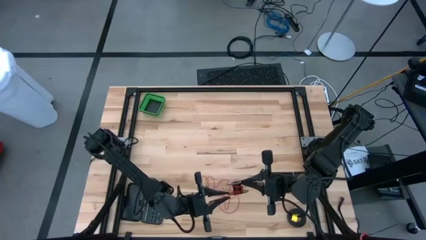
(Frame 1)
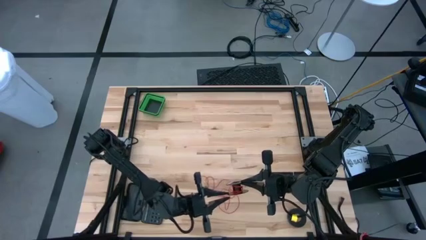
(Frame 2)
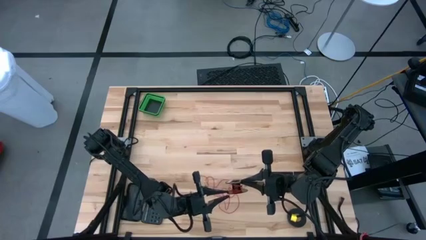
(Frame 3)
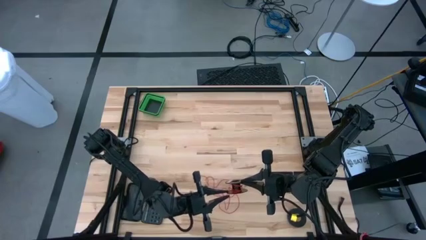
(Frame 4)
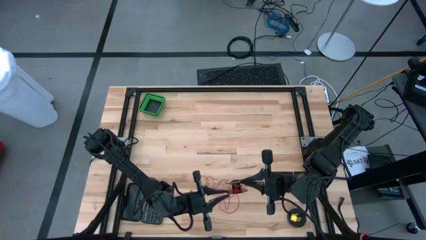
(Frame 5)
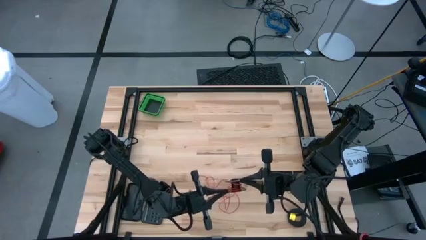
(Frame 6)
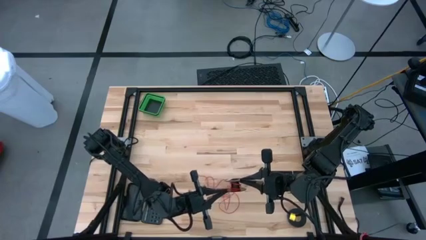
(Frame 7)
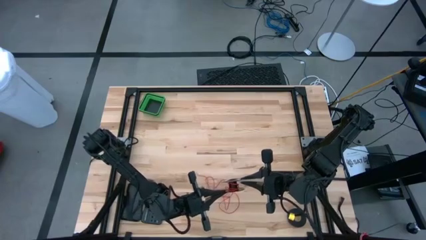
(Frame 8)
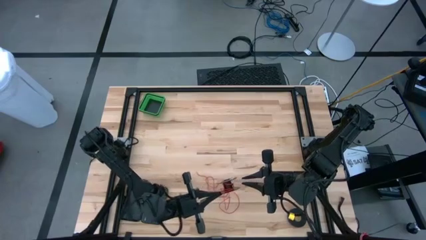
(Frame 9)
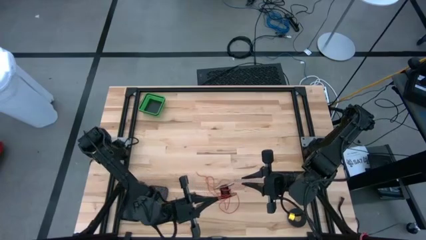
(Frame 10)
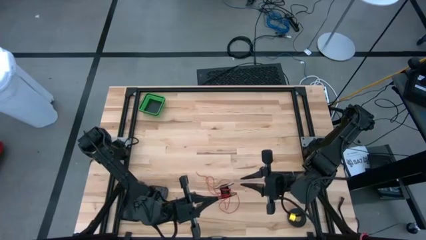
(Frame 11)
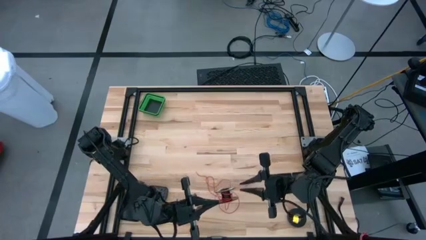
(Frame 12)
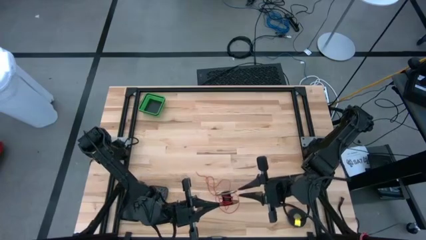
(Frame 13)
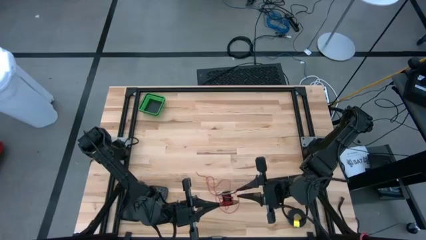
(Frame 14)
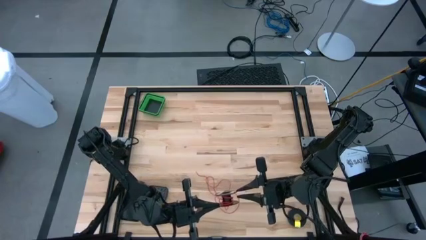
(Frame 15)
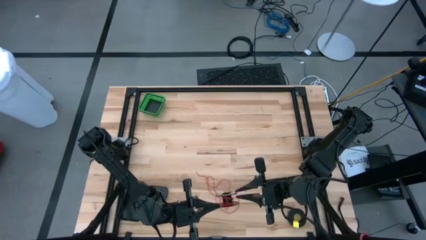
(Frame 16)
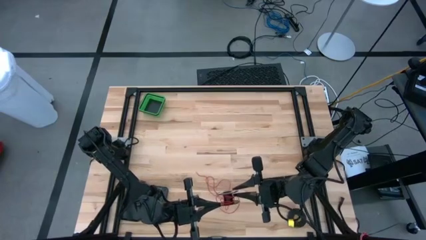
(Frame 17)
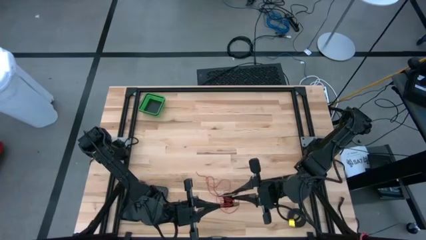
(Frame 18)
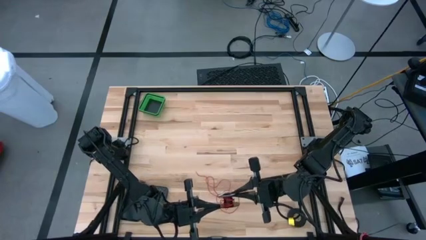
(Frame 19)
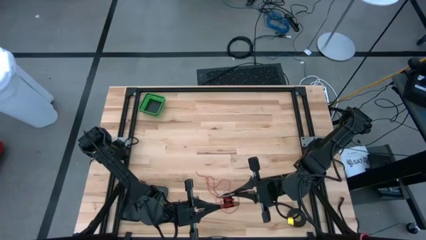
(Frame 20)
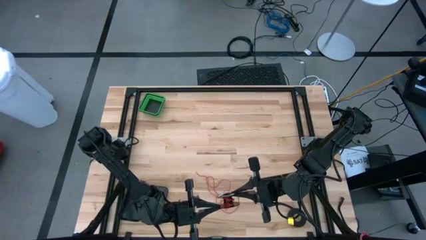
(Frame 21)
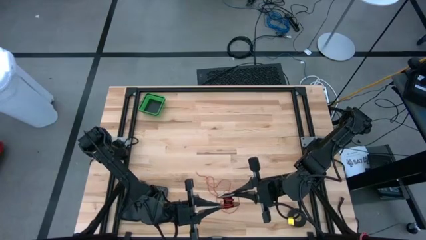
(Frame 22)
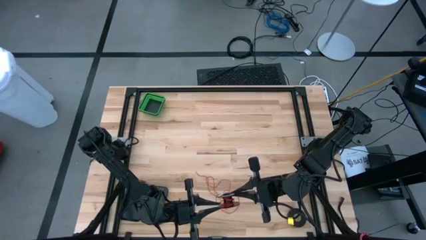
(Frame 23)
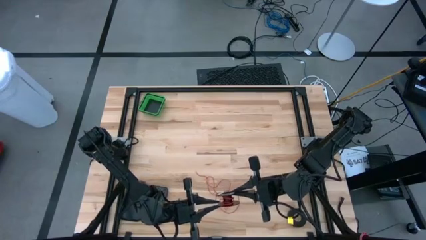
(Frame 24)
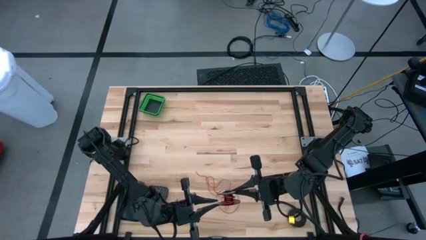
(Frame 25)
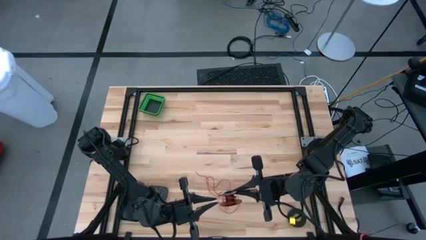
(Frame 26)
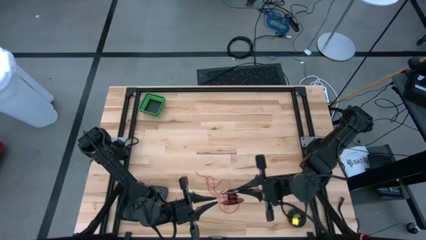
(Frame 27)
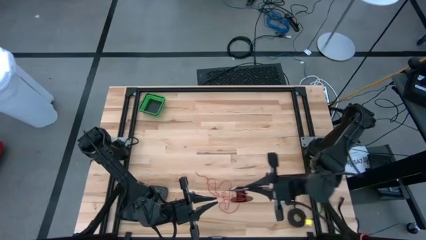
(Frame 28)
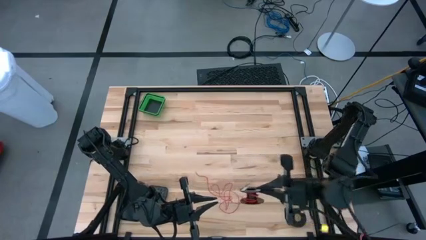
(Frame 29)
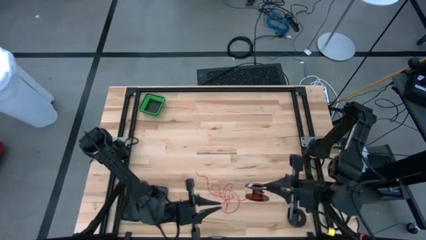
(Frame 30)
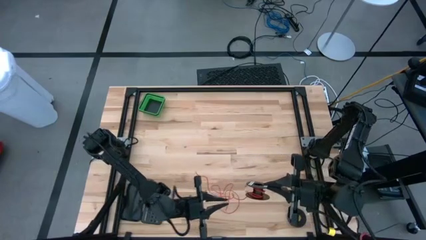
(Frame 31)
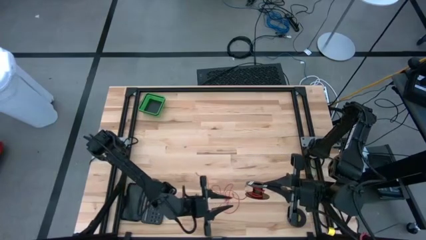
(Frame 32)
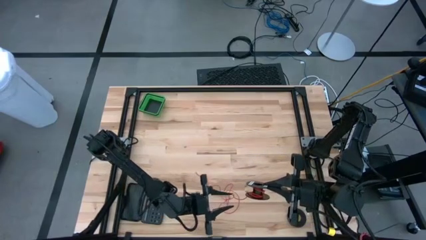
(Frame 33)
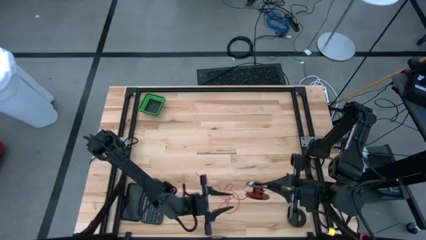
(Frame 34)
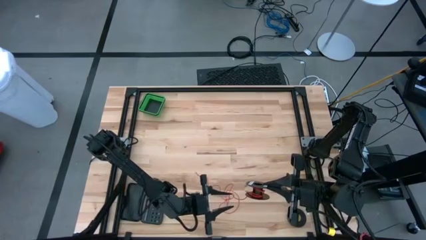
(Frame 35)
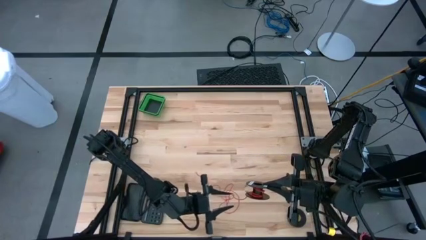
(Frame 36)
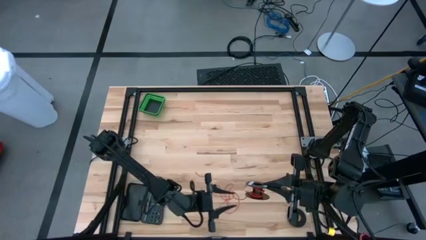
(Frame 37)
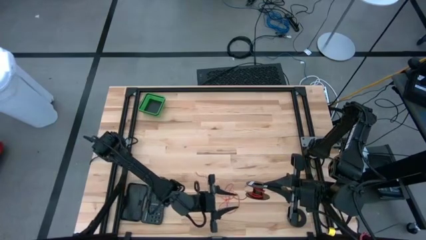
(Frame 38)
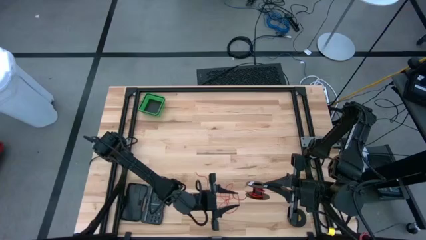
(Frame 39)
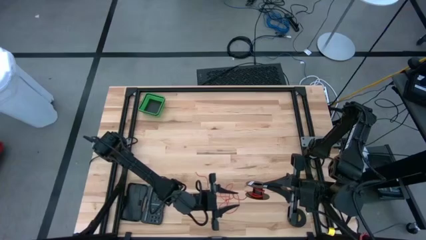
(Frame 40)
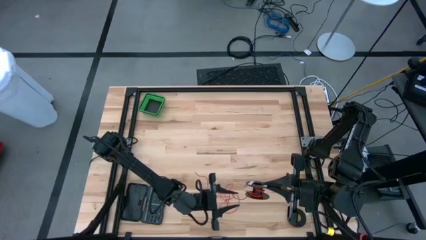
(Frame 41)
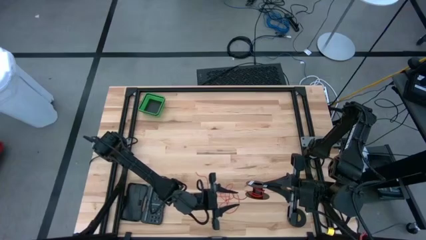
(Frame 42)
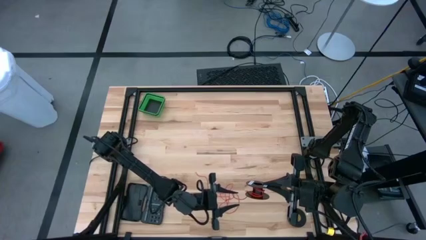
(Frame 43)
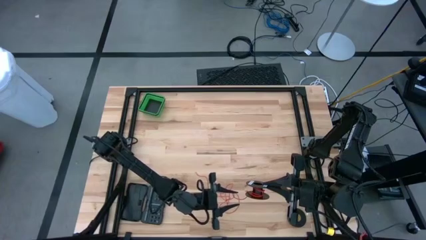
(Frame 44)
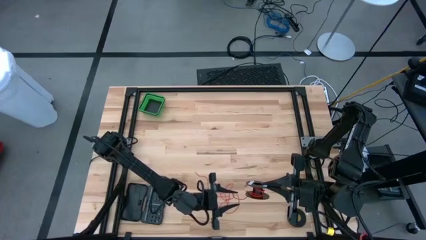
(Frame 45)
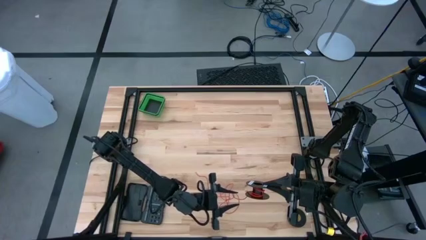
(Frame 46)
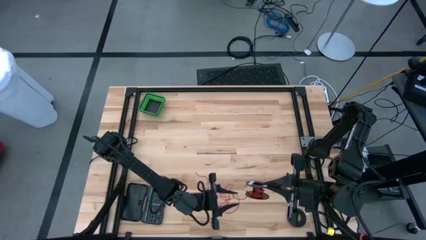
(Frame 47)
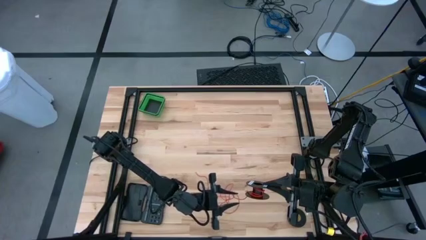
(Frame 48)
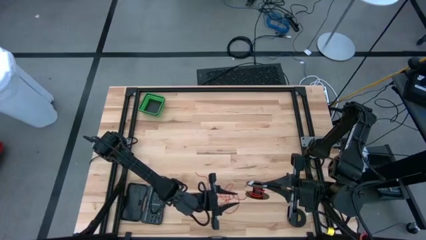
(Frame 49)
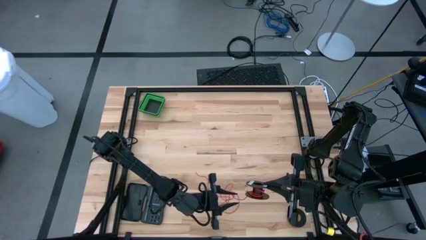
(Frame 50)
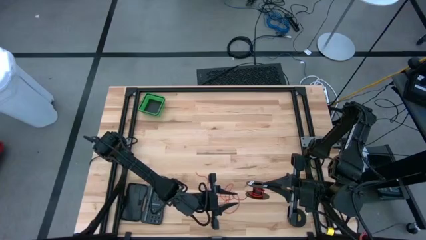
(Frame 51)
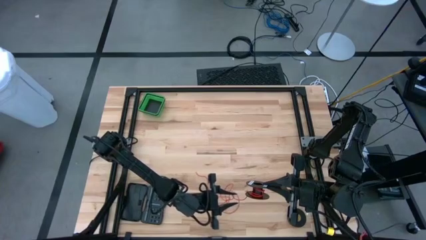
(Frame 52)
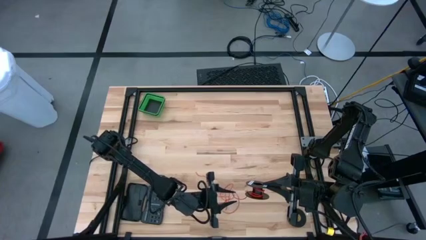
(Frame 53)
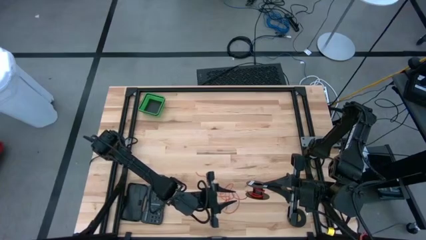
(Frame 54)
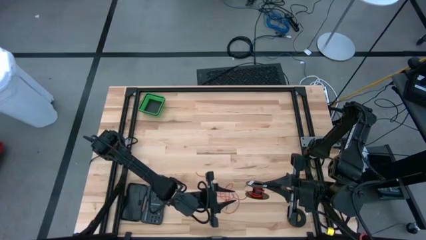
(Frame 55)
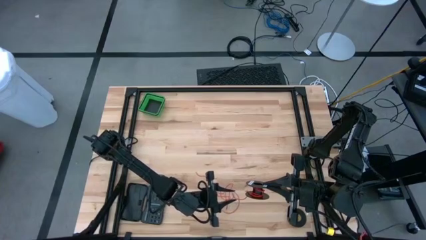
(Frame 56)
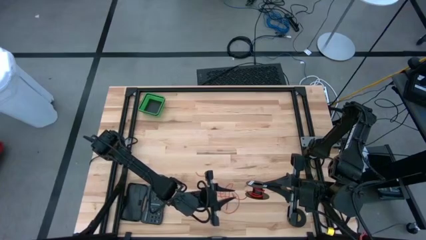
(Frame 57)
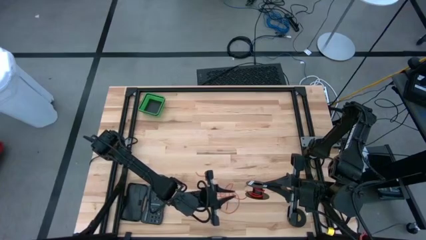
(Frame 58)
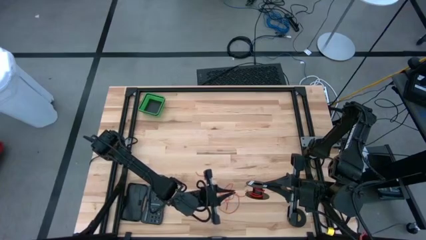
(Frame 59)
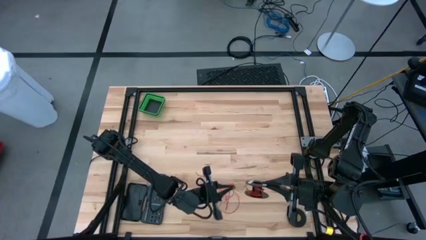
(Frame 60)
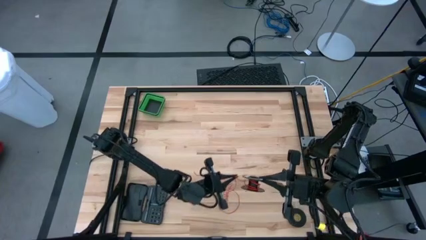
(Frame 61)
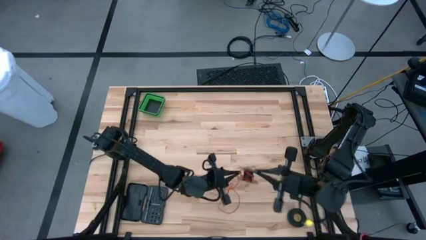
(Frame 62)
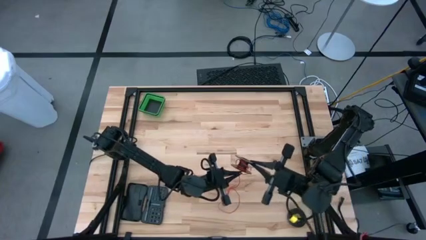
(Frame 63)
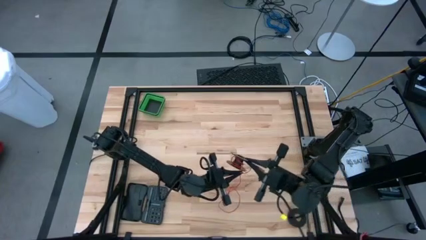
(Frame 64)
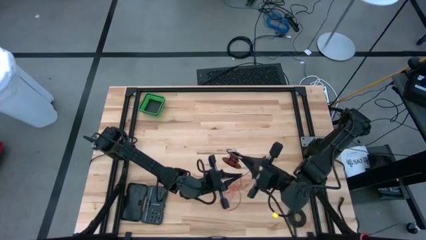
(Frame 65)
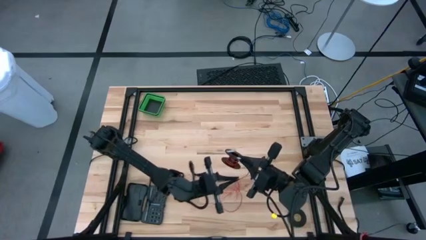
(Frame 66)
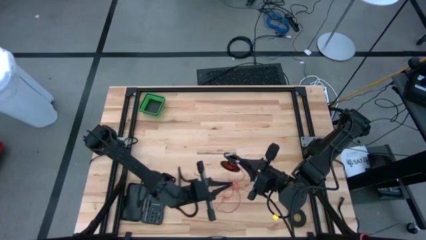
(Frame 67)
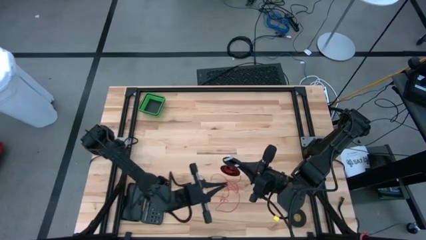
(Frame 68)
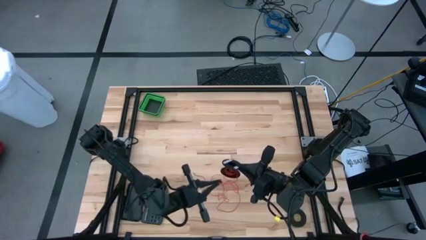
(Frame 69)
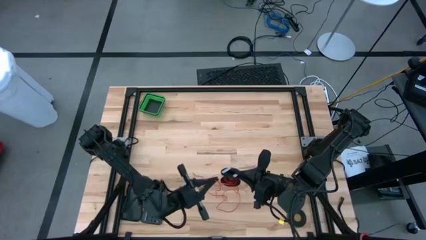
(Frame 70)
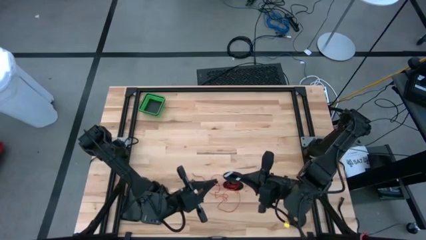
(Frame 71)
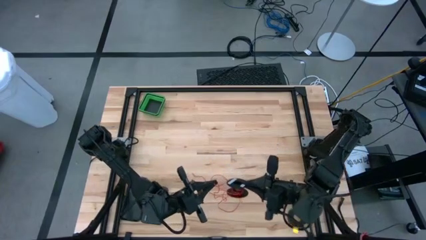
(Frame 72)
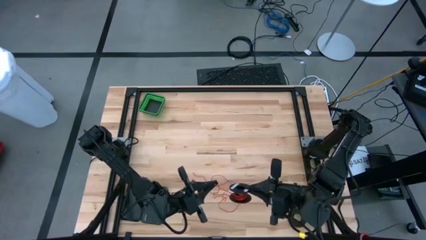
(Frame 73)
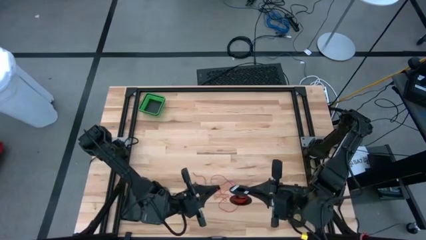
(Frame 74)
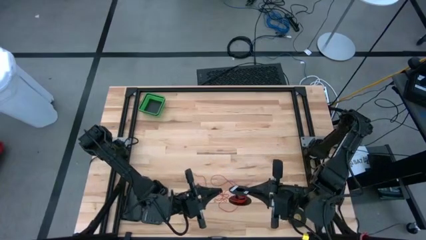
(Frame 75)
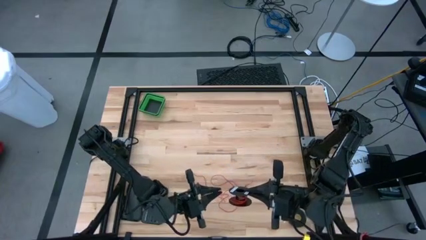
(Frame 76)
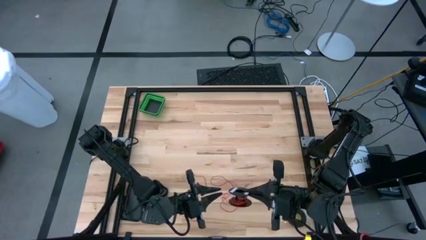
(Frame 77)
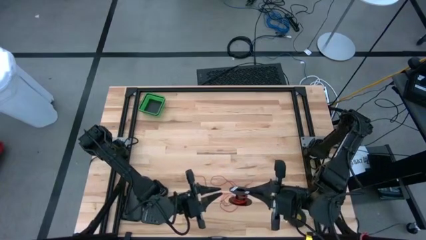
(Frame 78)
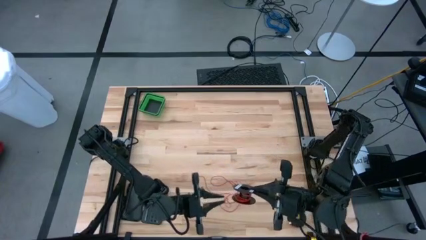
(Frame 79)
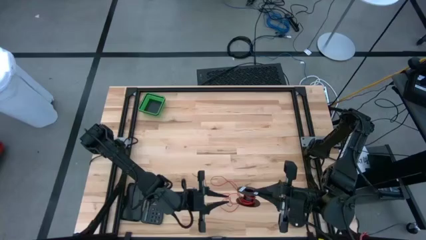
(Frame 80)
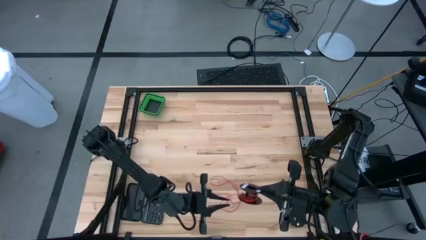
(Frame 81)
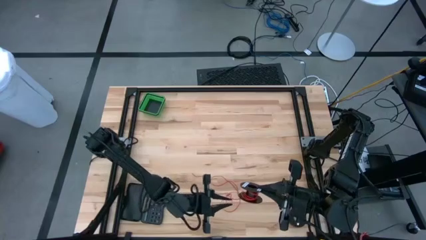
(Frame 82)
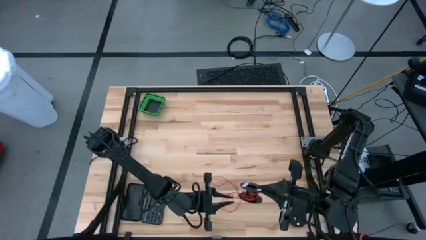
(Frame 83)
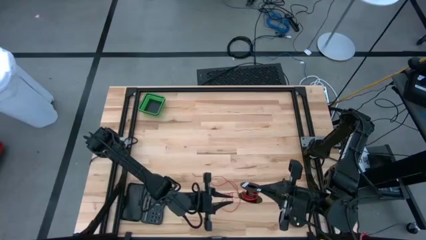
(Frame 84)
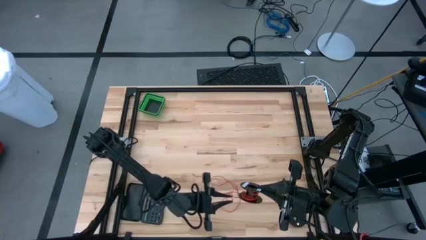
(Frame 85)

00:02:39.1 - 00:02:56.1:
Task: Coil cords
Coil the red wire into the spool
